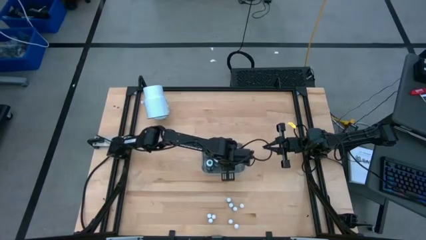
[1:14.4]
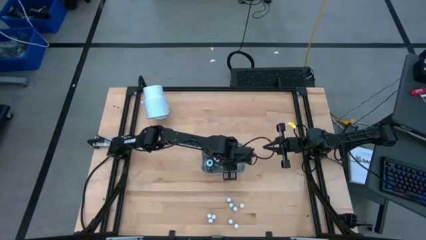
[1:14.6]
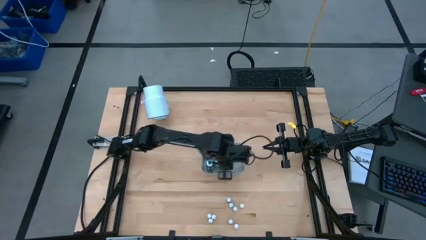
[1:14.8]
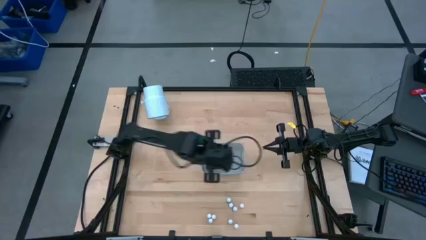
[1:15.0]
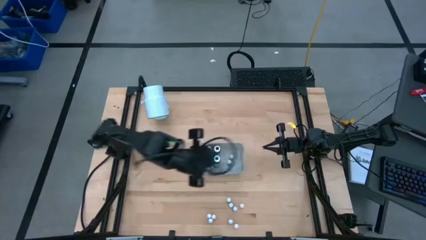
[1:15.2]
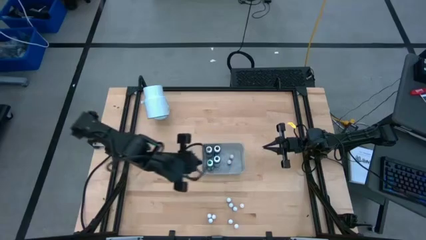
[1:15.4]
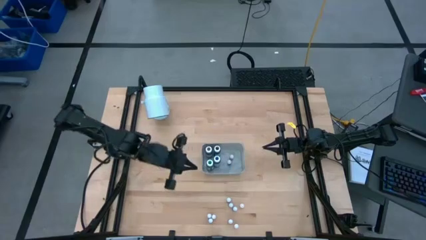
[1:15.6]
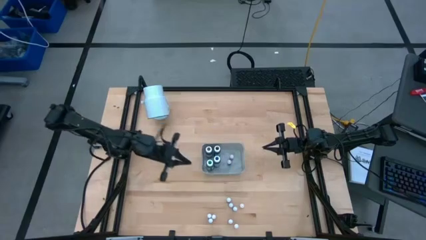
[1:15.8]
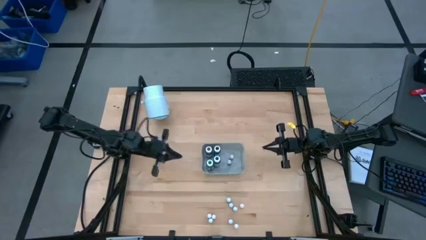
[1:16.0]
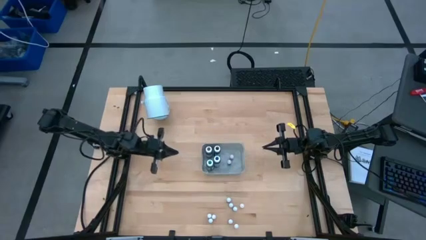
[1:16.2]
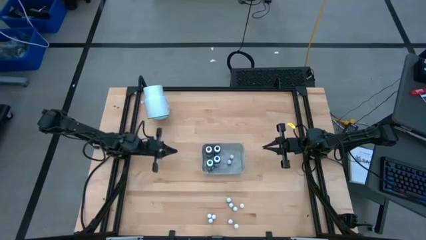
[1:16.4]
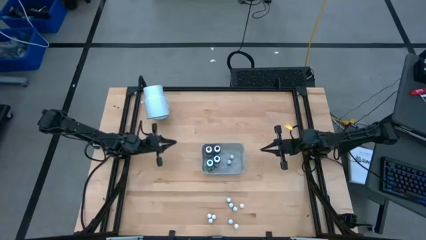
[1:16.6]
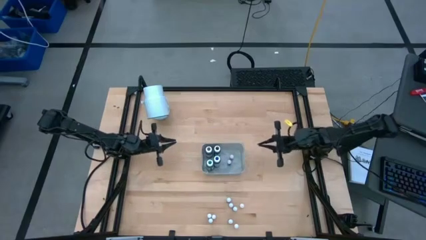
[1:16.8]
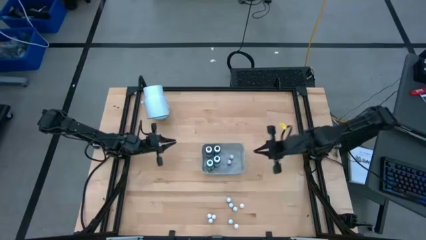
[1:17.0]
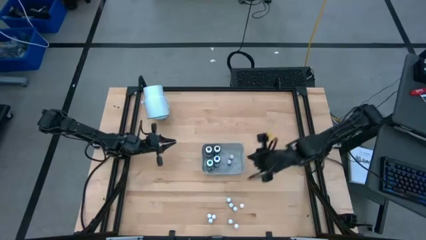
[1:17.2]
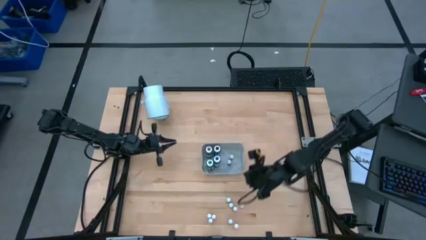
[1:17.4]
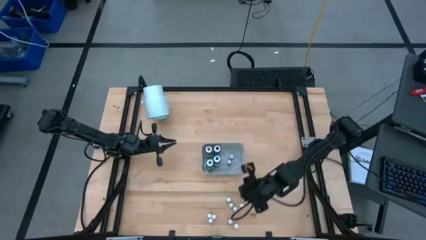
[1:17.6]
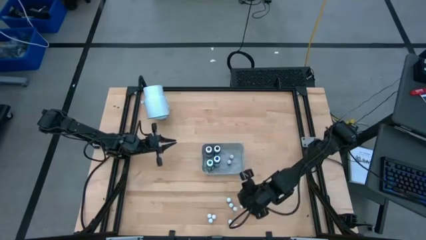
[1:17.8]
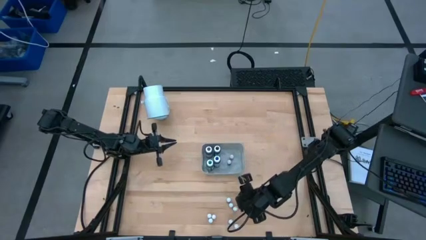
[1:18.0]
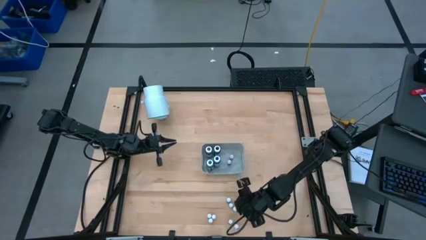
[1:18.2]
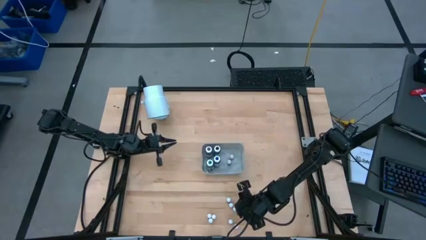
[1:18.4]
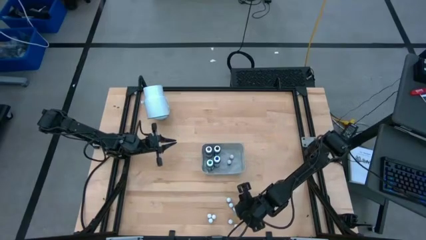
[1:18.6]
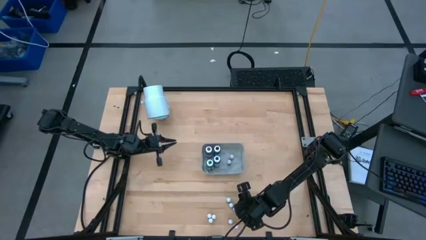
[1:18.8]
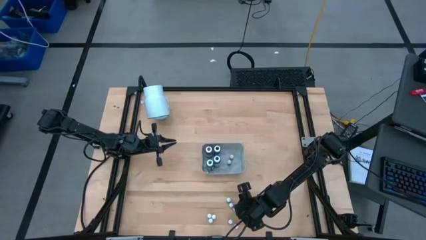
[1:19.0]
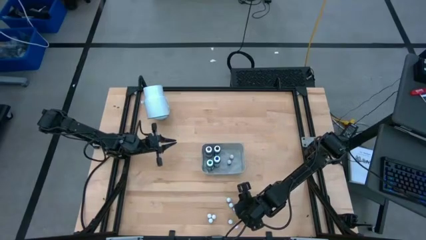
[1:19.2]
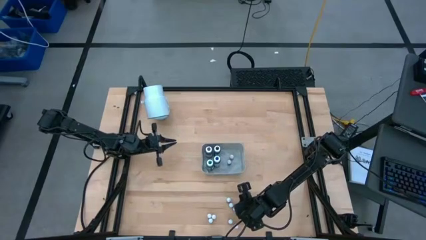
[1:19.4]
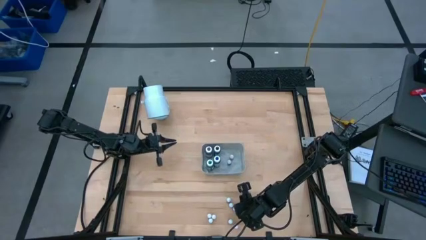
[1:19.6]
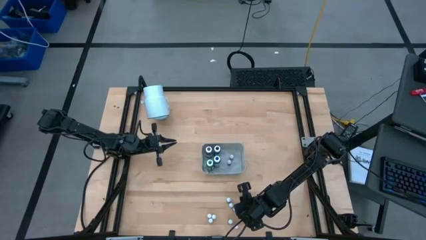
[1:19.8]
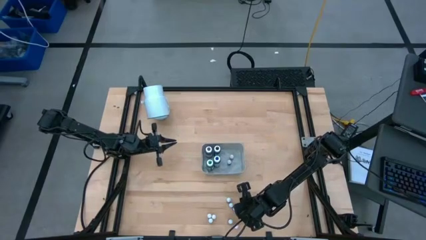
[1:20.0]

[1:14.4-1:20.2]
Task: Pick & Place food coloring
Put the small orange food coloring bottle into the bin

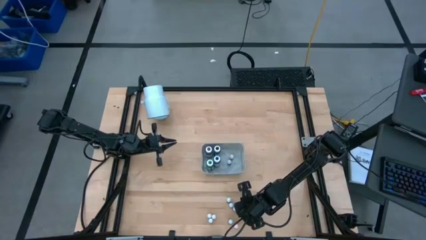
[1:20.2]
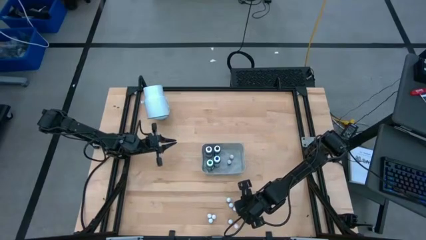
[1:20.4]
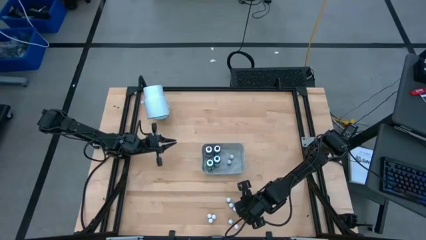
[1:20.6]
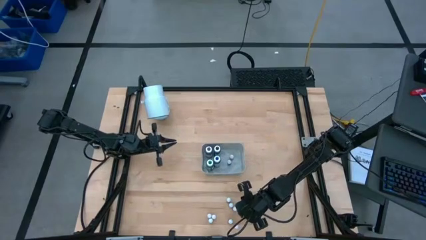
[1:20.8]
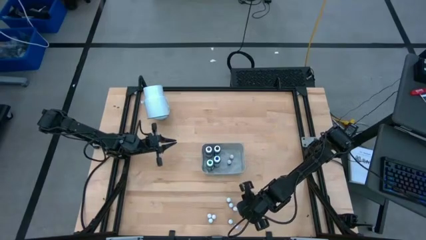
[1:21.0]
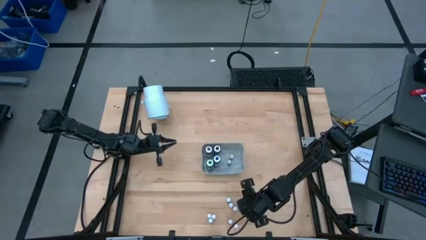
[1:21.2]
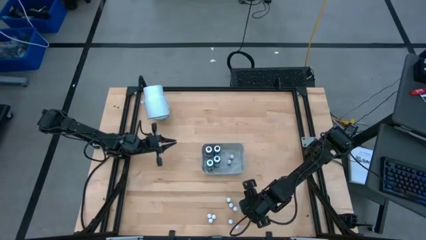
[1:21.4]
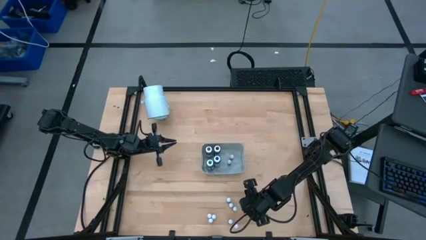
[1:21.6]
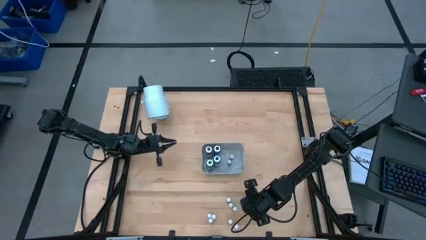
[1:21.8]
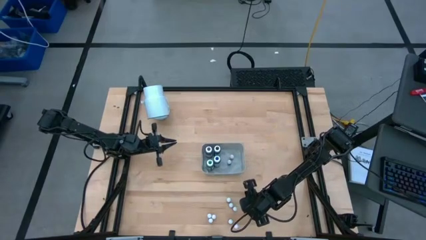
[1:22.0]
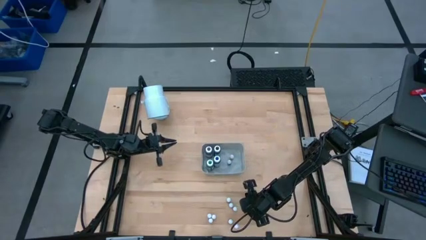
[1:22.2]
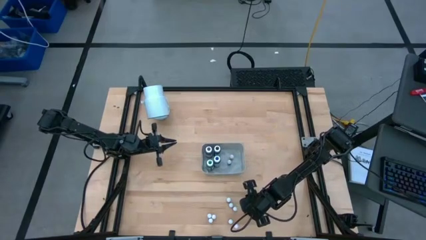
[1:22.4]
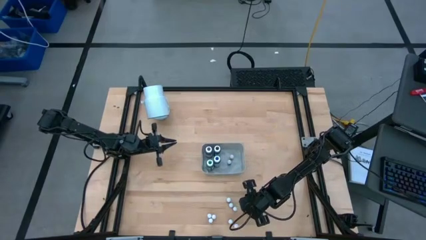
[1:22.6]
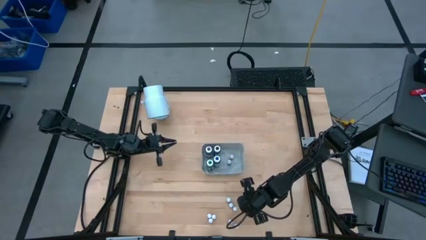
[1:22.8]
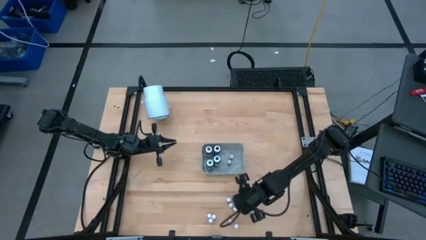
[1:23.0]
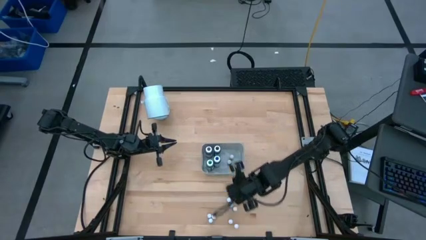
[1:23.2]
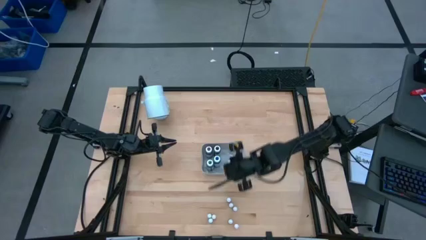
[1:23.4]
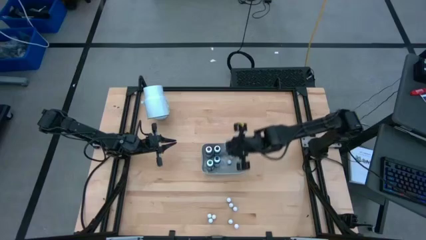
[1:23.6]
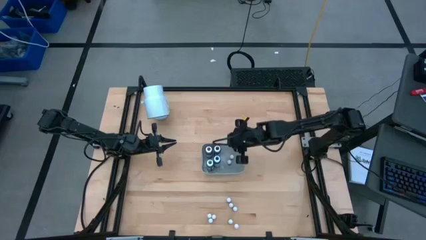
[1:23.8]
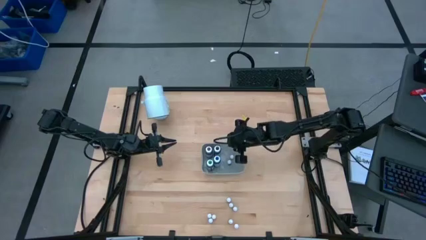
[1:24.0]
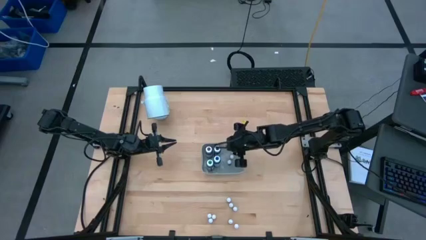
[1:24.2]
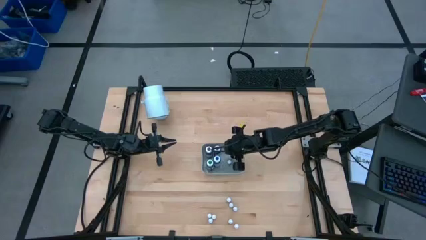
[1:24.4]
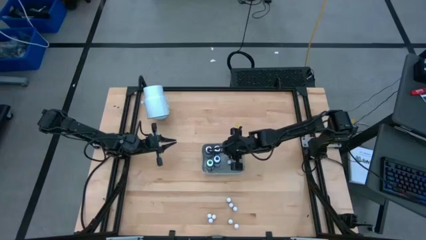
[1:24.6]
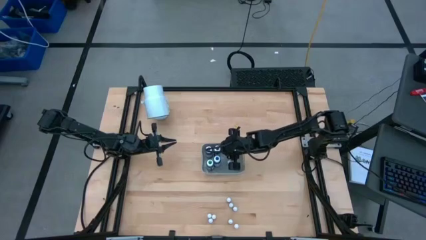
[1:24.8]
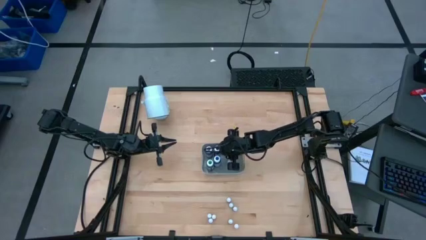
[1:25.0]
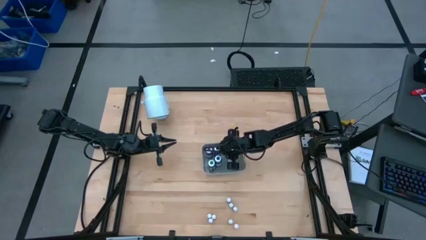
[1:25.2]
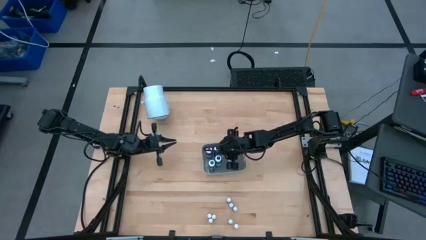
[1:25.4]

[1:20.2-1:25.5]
Put the small orange food coloring bottle into the bin

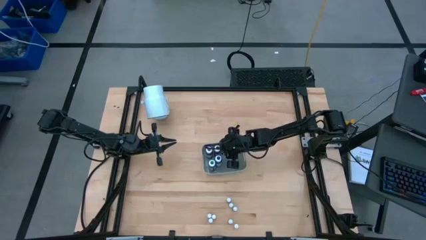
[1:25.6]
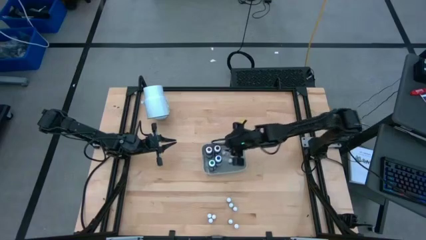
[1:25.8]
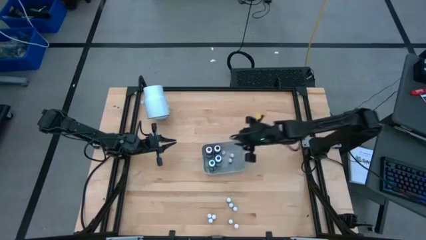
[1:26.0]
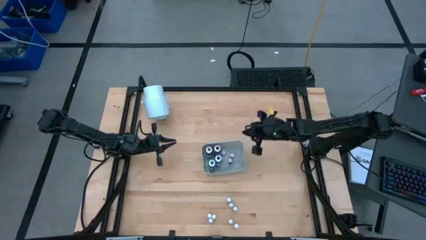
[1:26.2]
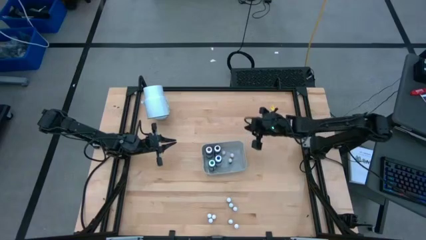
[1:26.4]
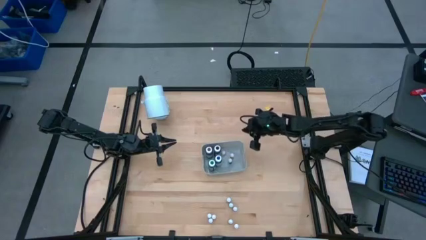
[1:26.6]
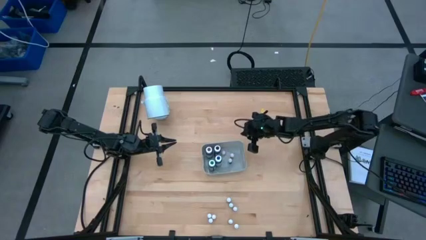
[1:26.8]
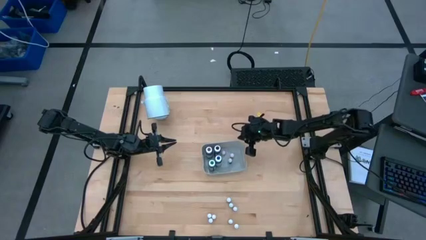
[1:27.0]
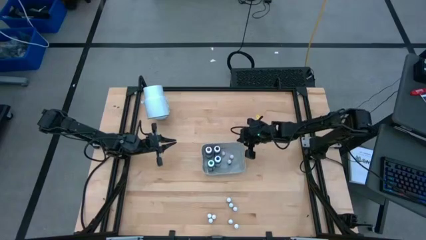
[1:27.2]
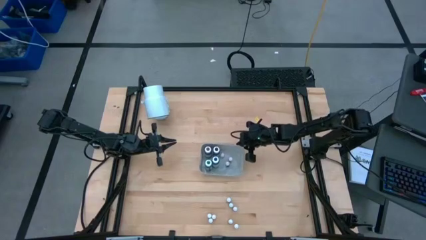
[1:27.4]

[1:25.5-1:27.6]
Adjust the bin on the table
